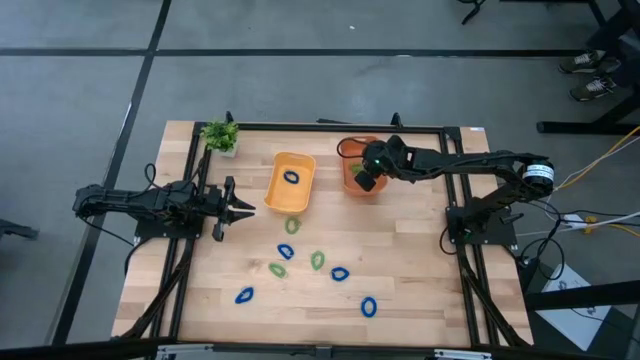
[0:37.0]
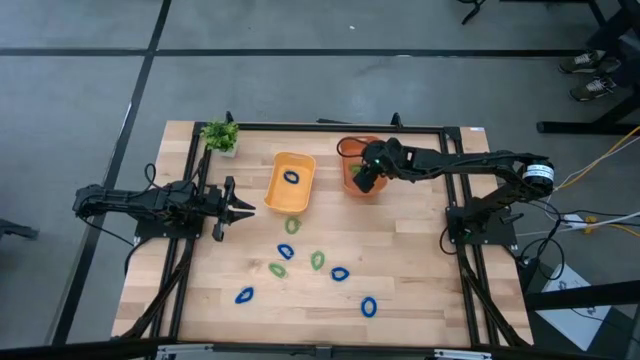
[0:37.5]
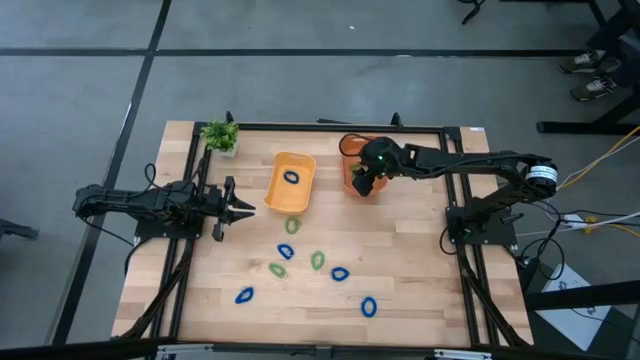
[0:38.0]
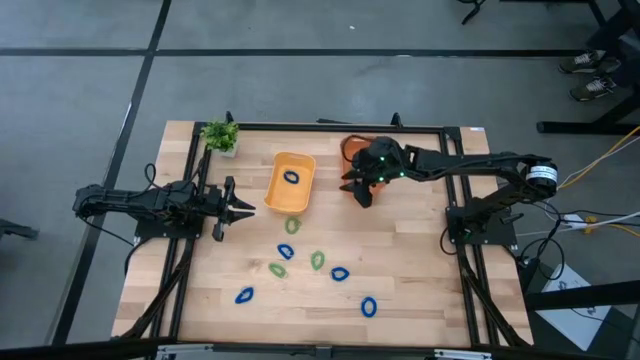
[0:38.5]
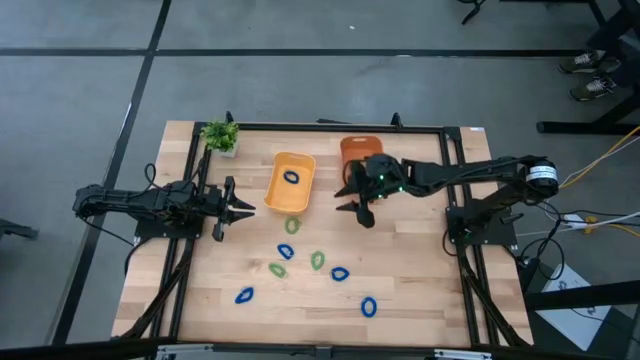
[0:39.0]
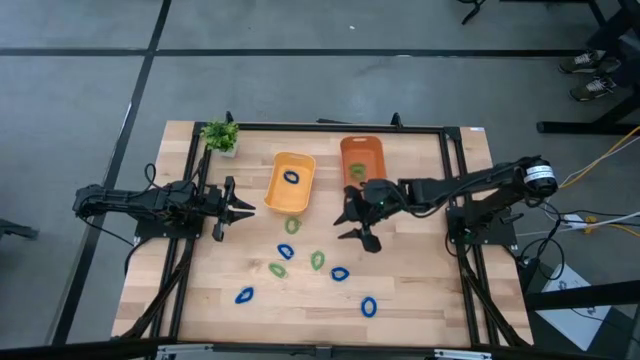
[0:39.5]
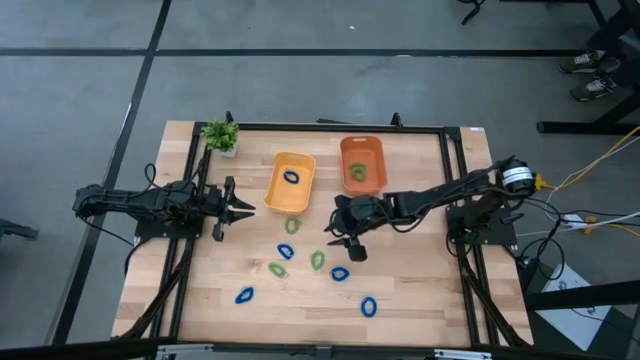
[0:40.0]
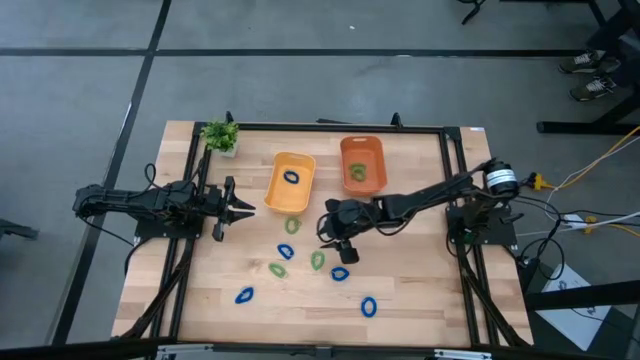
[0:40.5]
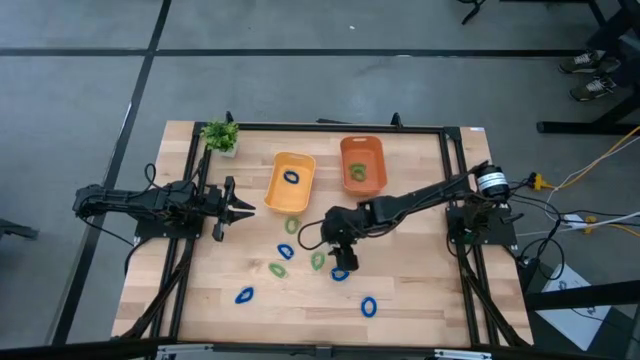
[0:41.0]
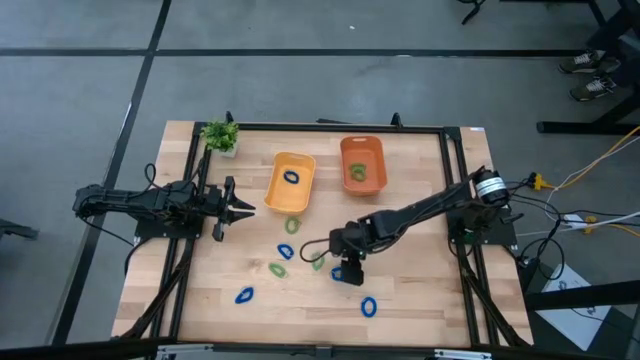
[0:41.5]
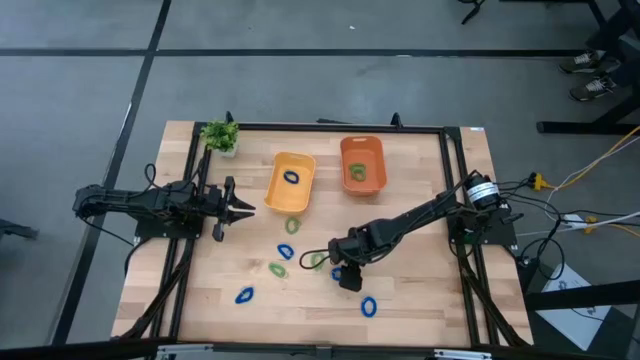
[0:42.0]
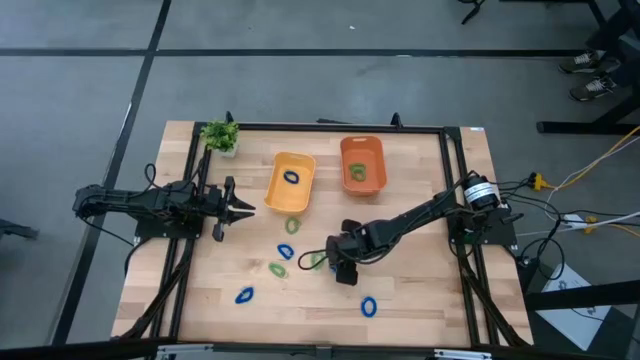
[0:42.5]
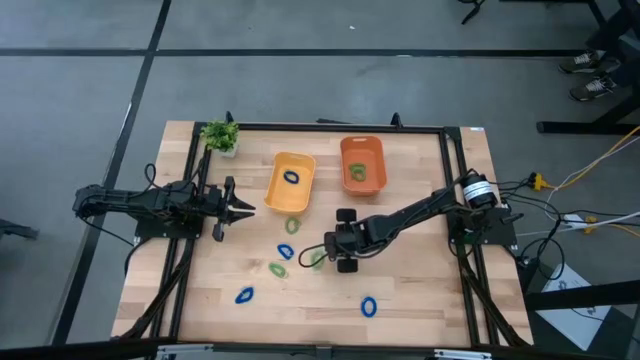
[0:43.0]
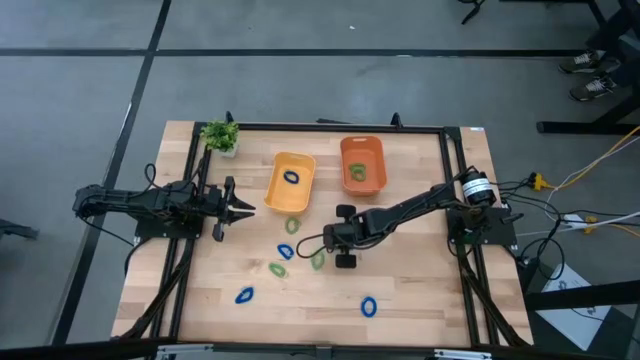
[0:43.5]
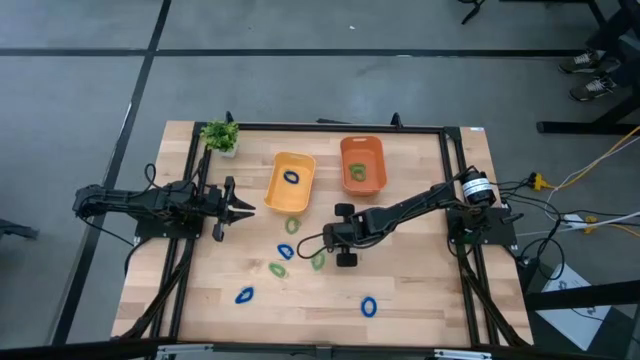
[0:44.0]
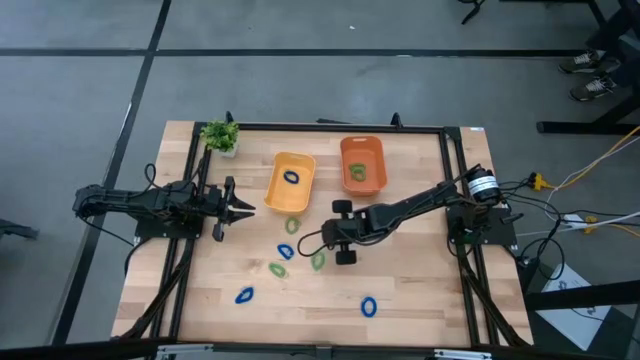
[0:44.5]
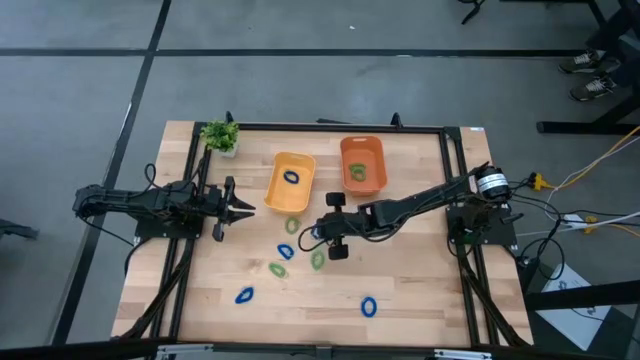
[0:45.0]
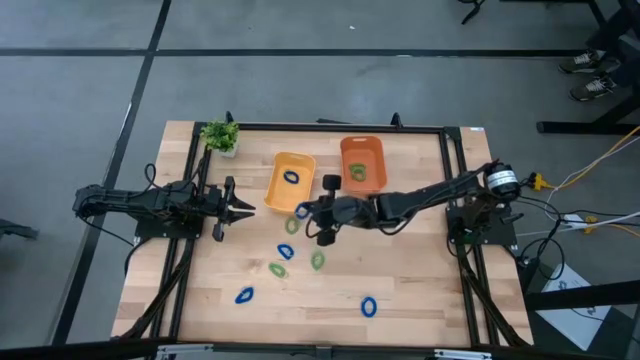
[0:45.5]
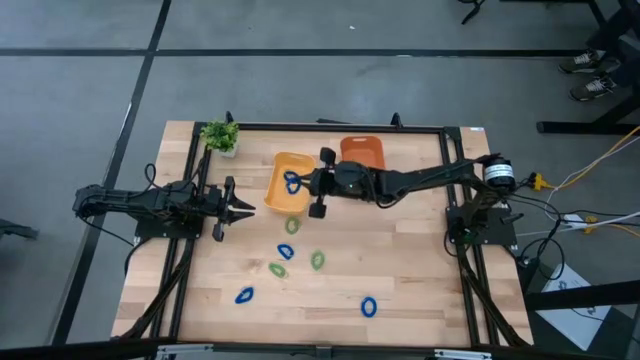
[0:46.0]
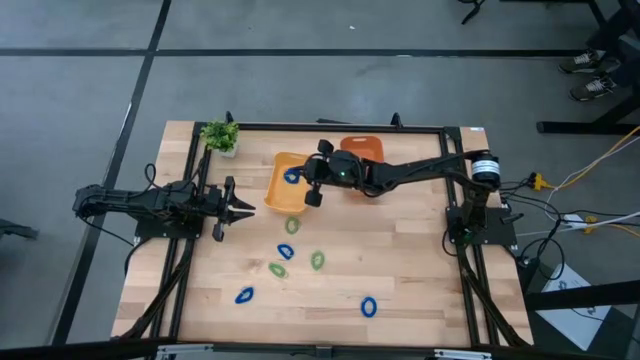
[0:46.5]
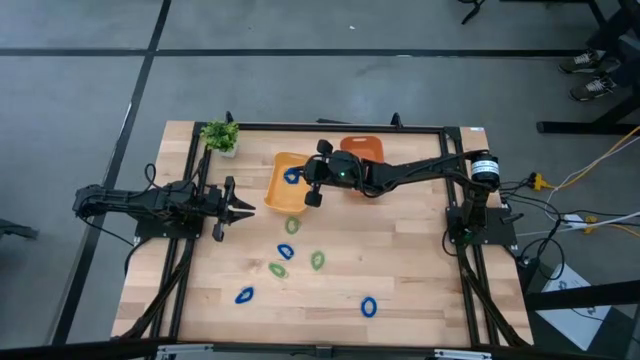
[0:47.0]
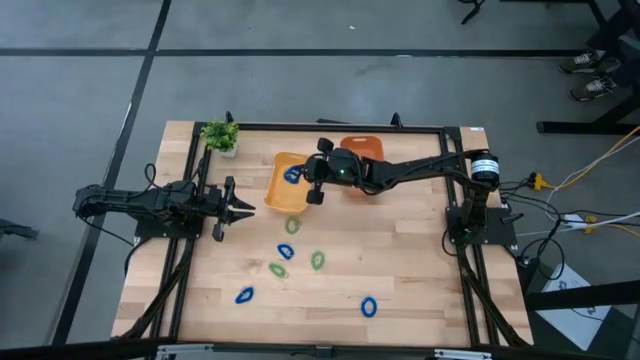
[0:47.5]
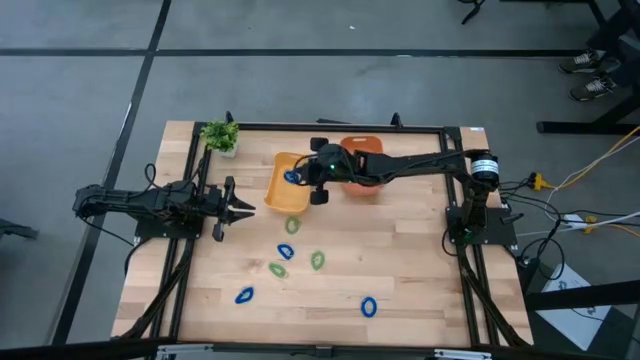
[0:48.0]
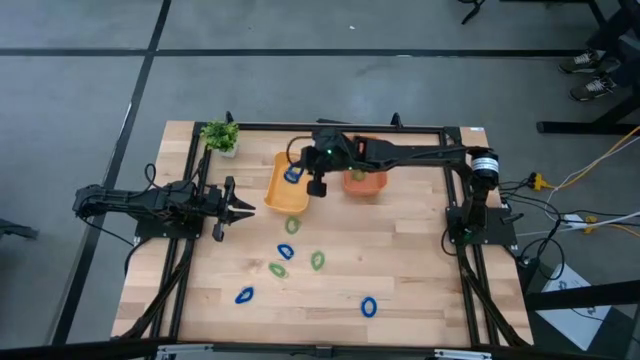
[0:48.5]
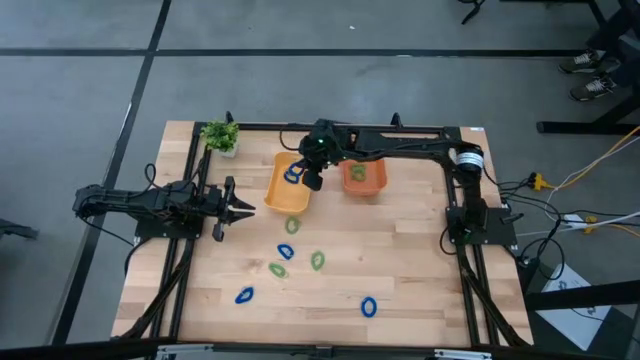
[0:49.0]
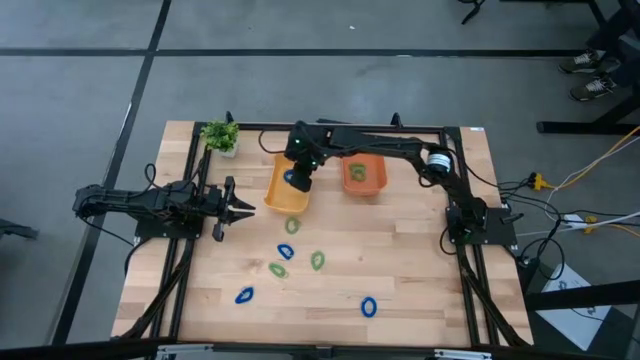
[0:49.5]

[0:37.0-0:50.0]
Task: Sort items
Put the blue keychain into the yellow bin

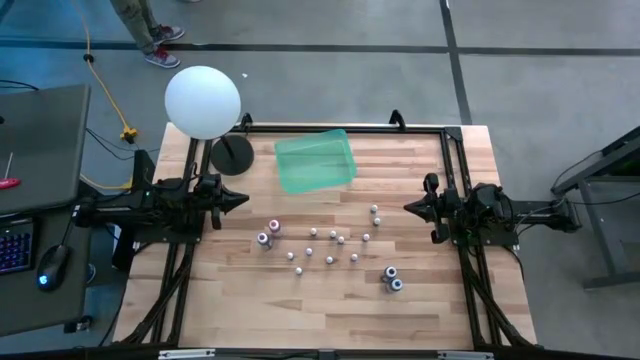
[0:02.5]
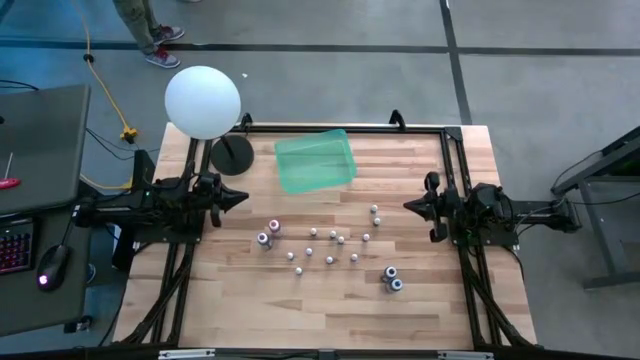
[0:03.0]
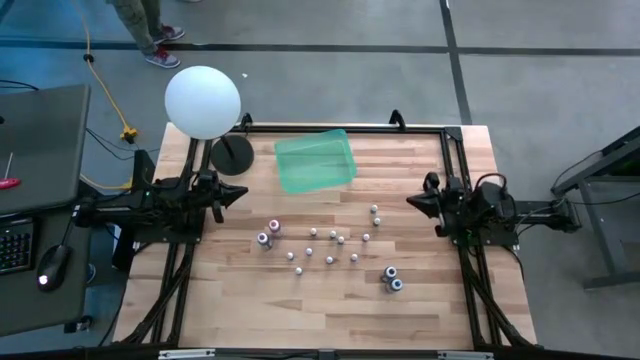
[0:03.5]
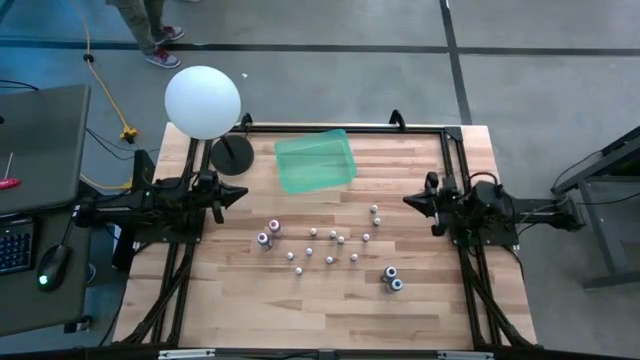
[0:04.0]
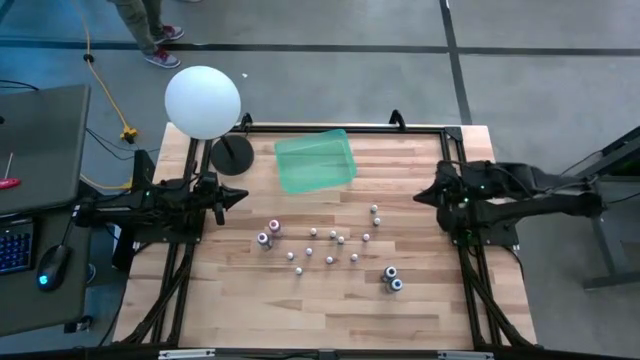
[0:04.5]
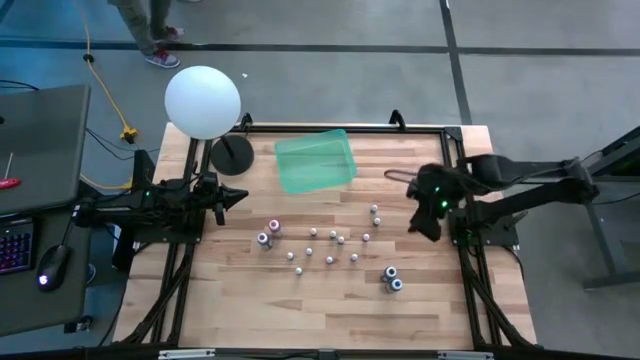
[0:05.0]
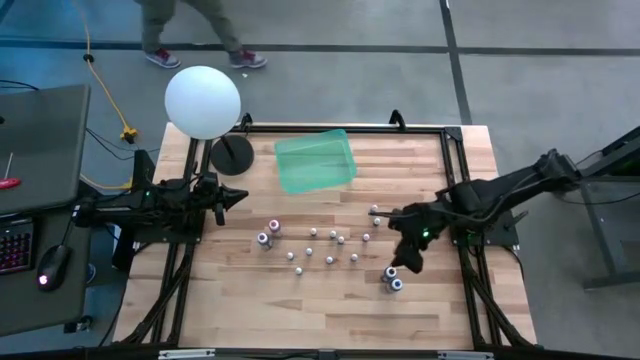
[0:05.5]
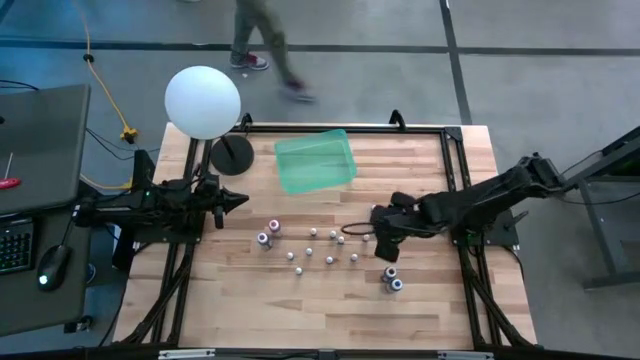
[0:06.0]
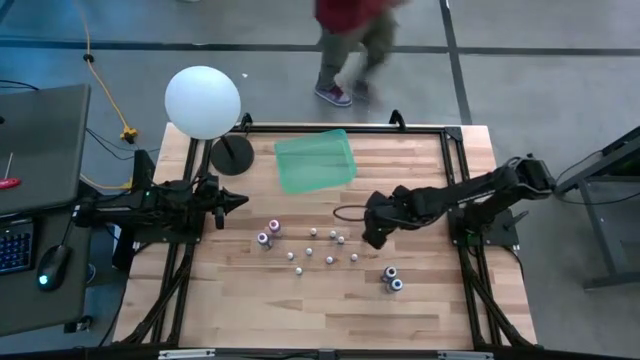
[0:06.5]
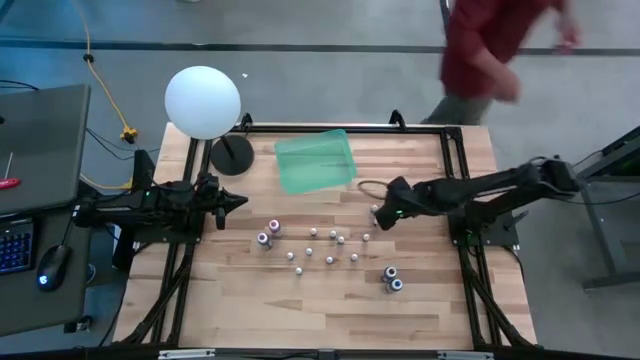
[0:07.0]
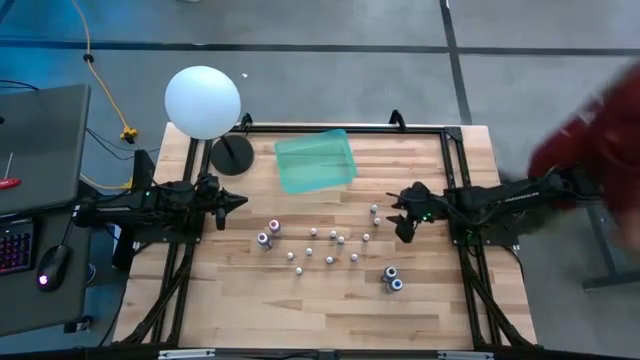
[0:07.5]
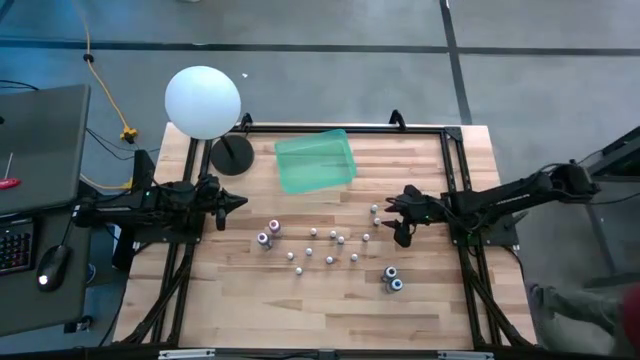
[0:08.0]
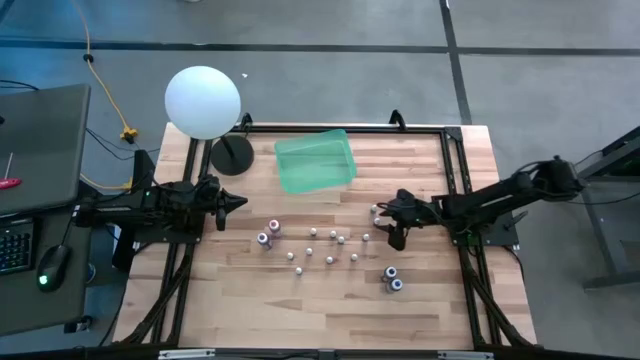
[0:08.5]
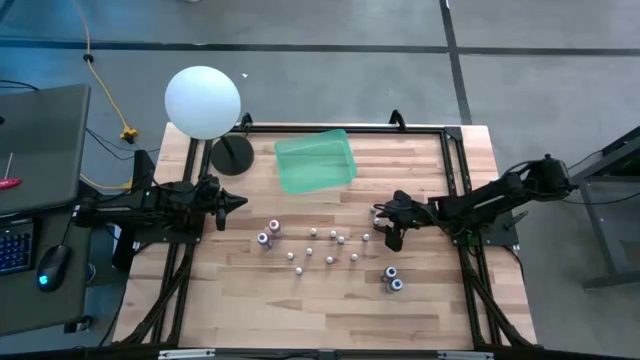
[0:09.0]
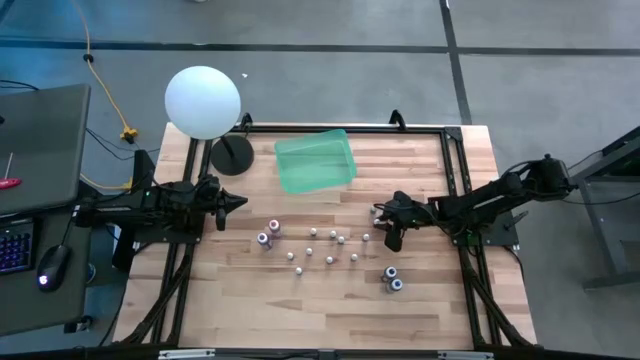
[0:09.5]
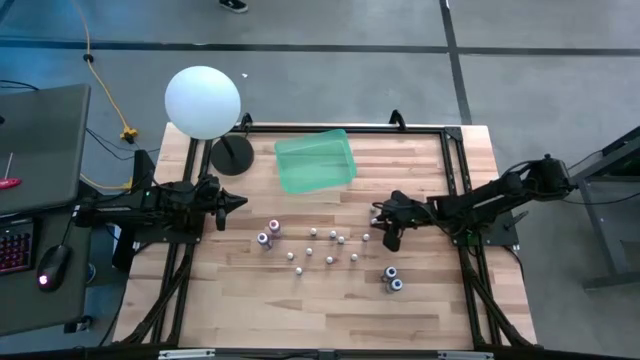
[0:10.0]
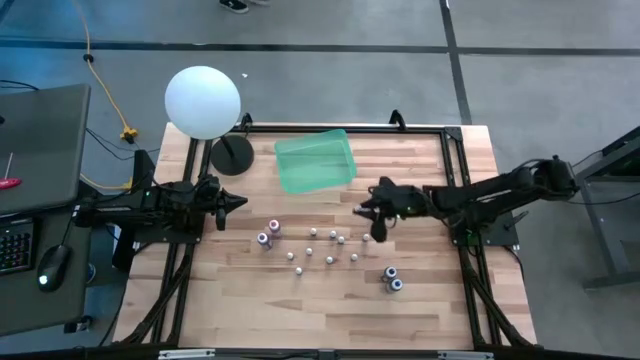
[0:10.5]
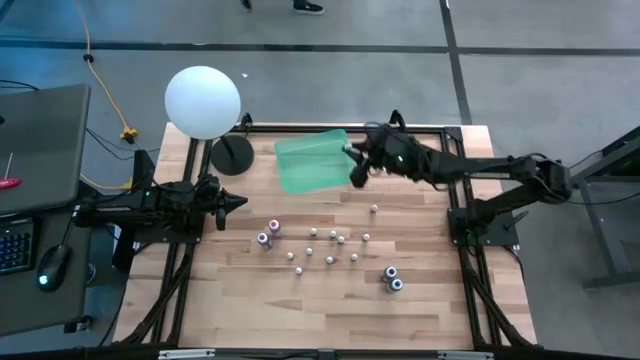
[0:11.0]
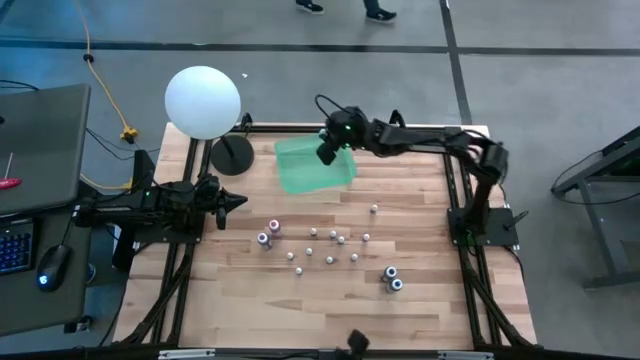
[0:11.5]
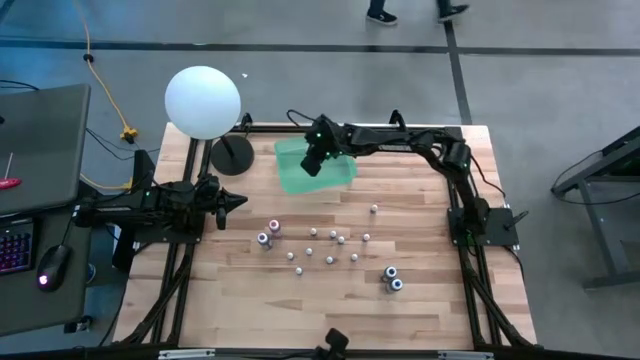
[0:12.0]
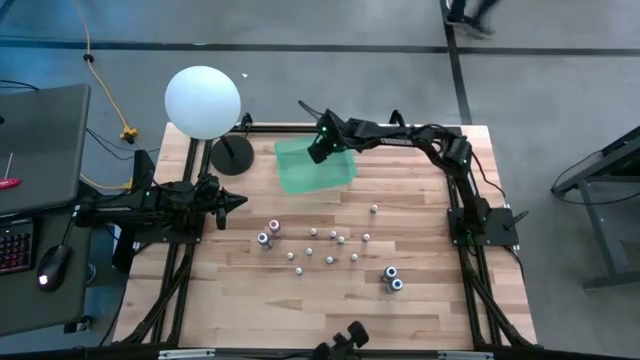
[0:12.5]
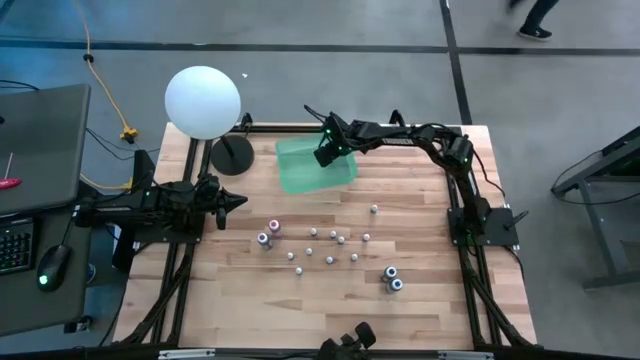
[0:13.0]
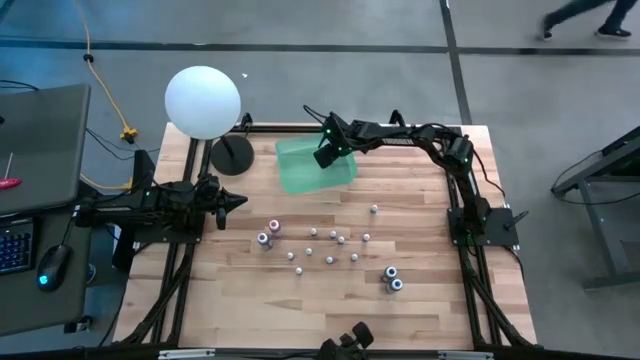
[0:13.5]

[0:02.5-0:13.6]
Task: Pick & Place food coloring
Put the small green dye bottle in the green bin
